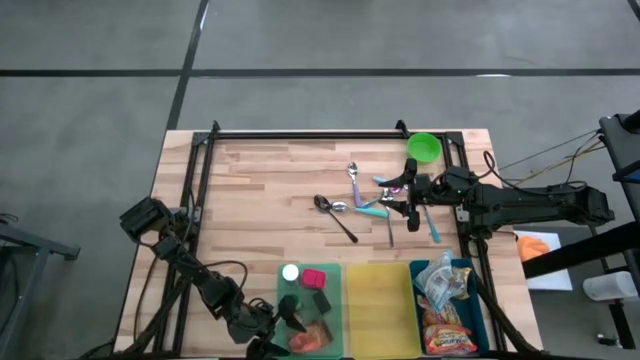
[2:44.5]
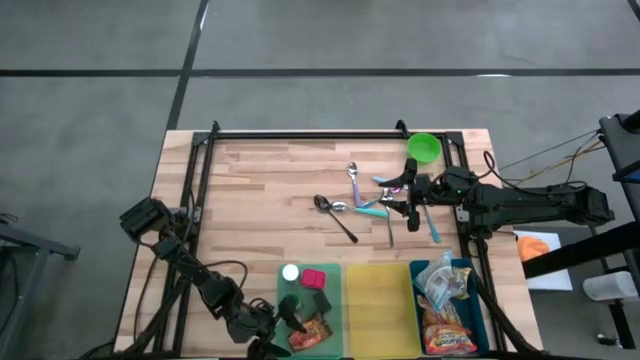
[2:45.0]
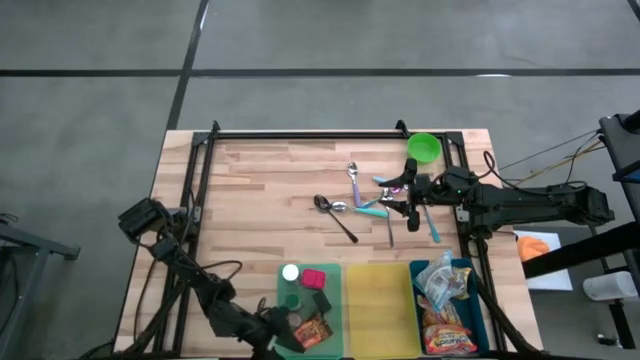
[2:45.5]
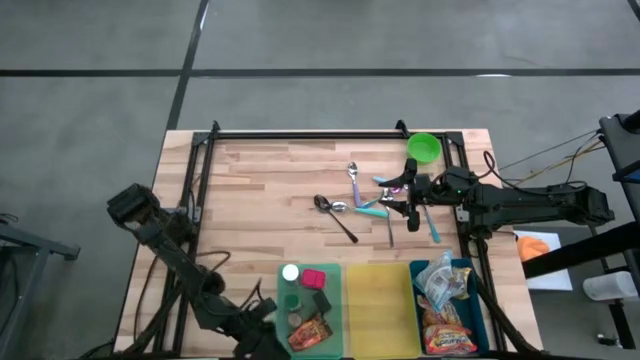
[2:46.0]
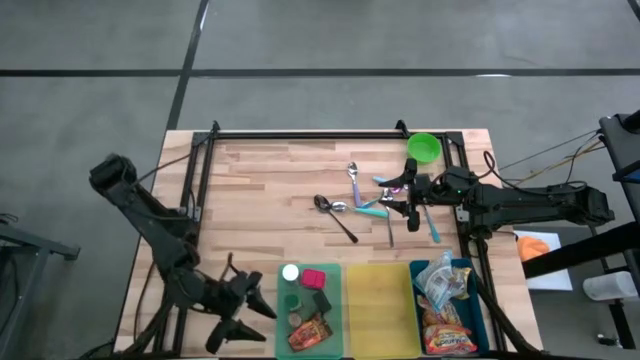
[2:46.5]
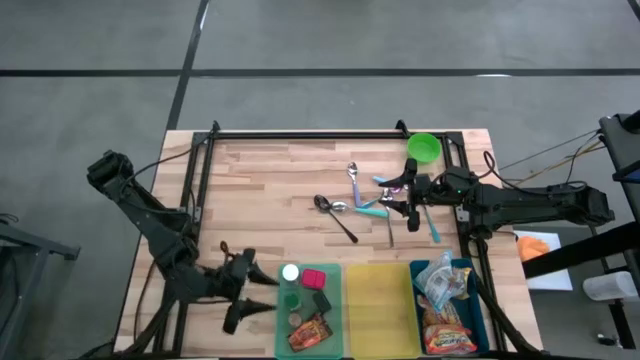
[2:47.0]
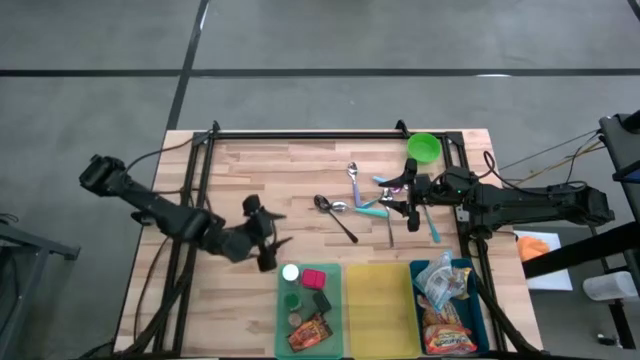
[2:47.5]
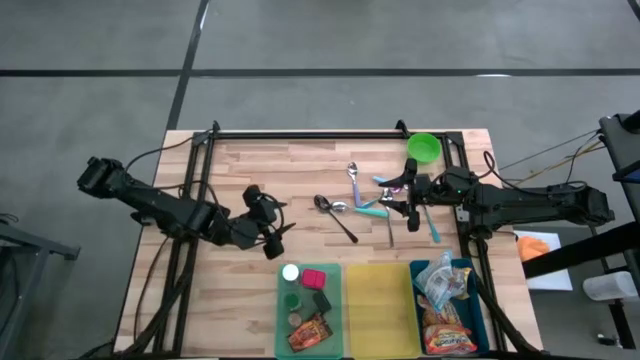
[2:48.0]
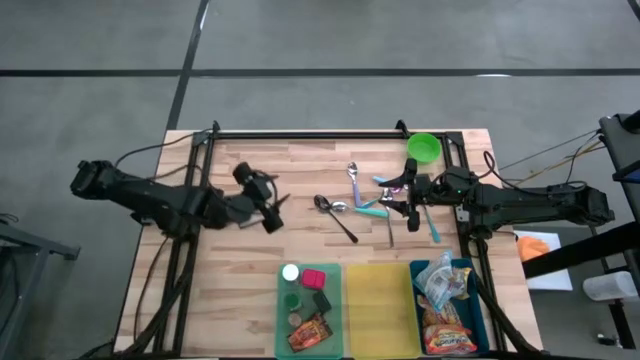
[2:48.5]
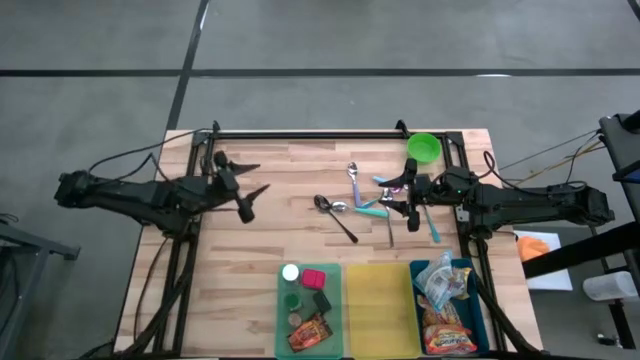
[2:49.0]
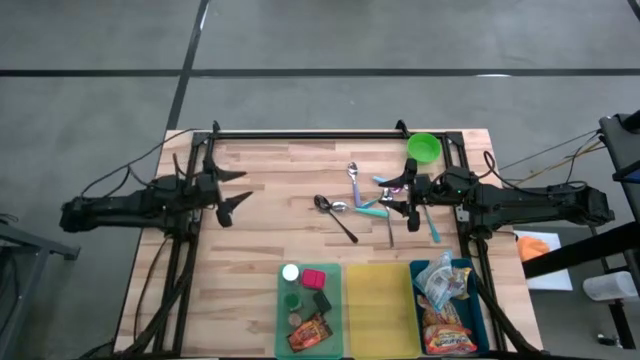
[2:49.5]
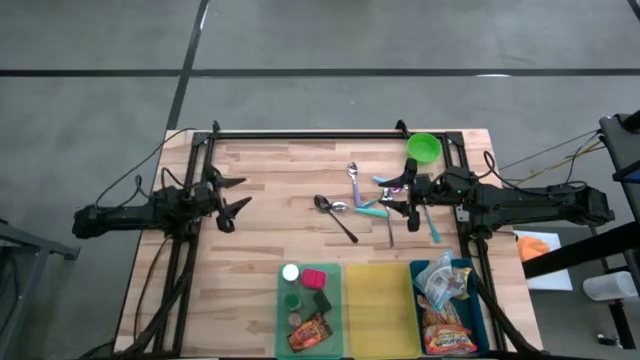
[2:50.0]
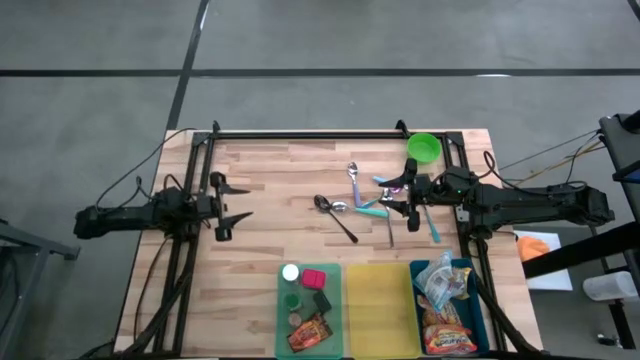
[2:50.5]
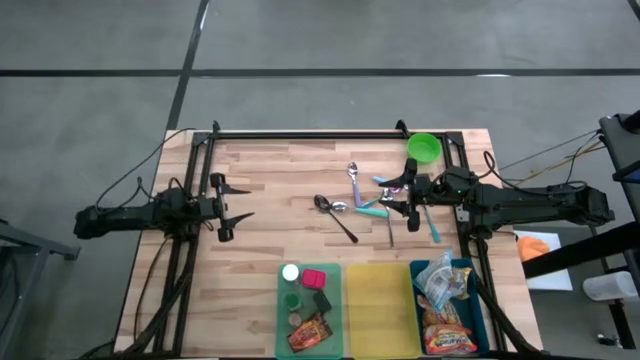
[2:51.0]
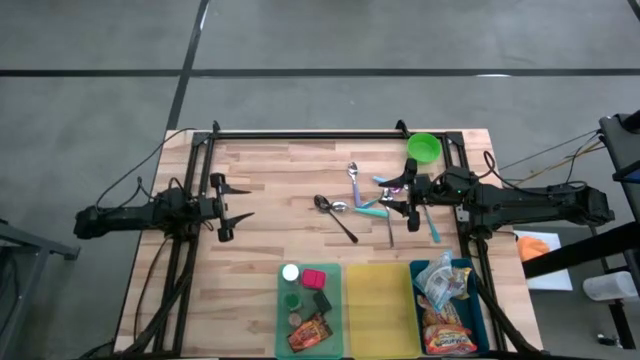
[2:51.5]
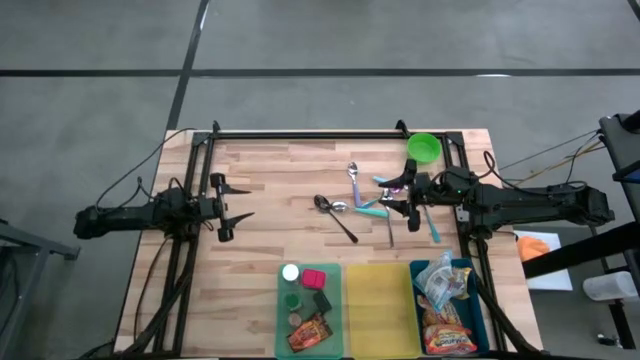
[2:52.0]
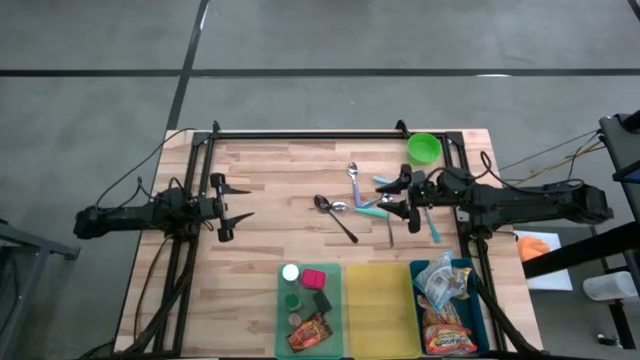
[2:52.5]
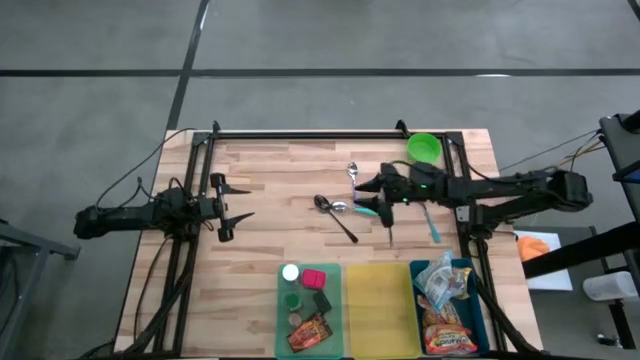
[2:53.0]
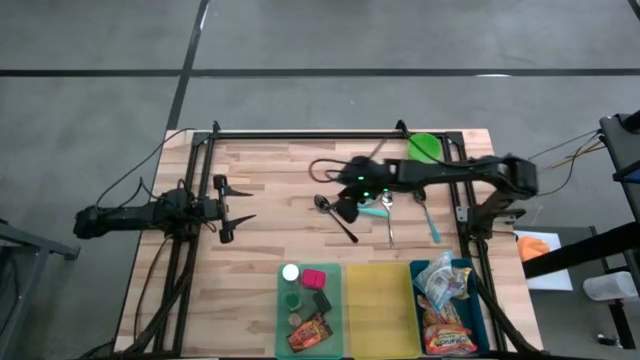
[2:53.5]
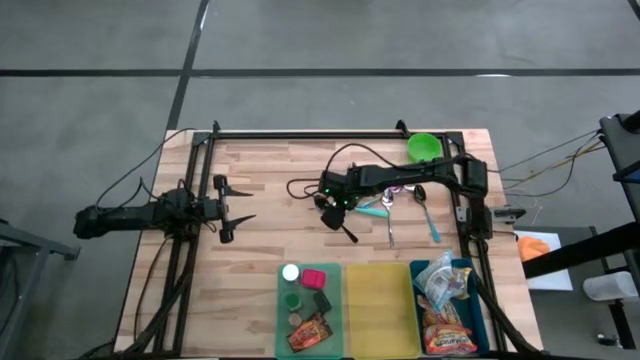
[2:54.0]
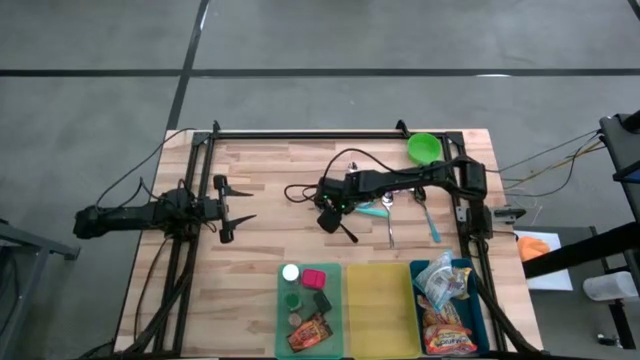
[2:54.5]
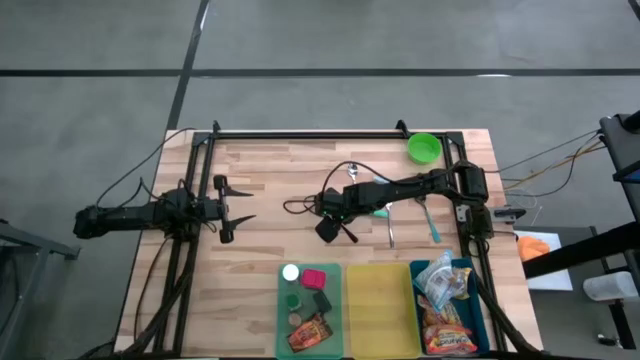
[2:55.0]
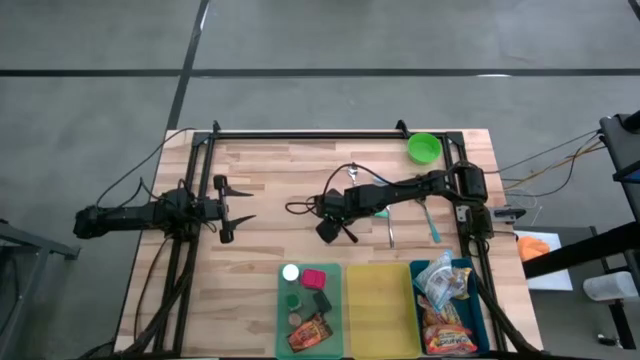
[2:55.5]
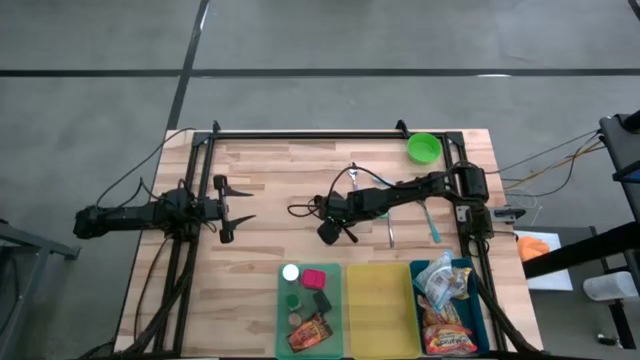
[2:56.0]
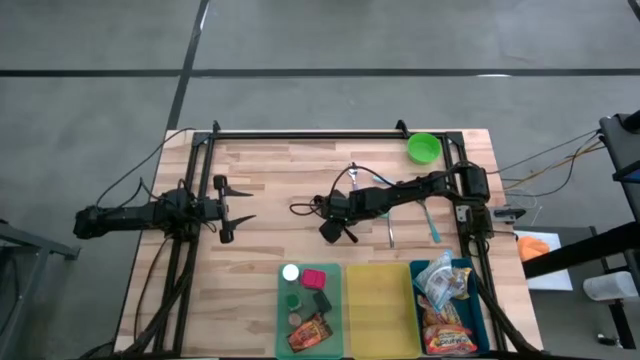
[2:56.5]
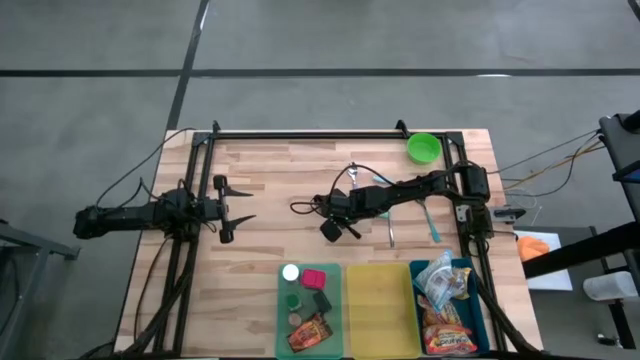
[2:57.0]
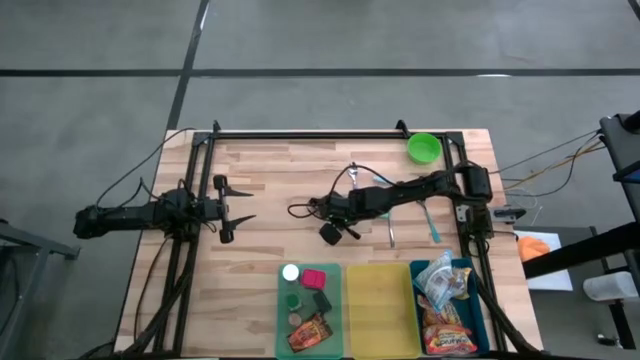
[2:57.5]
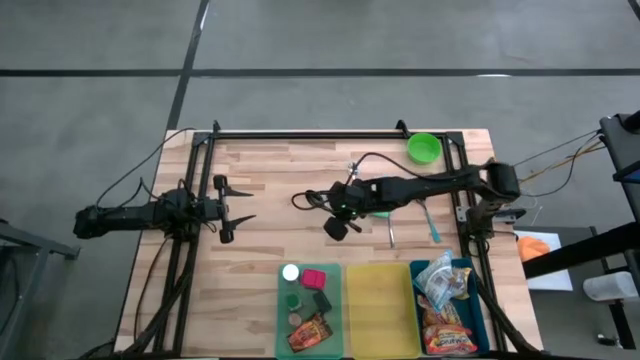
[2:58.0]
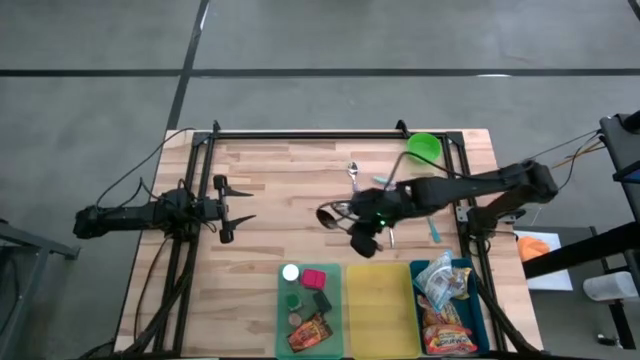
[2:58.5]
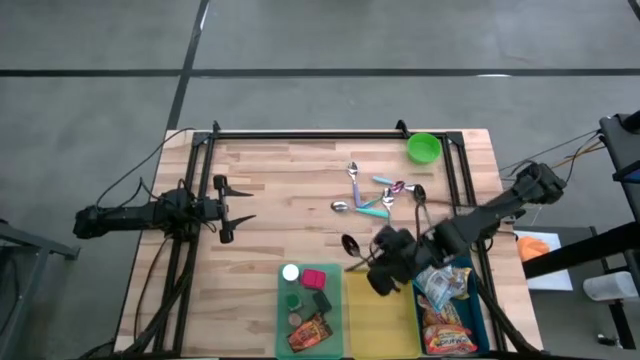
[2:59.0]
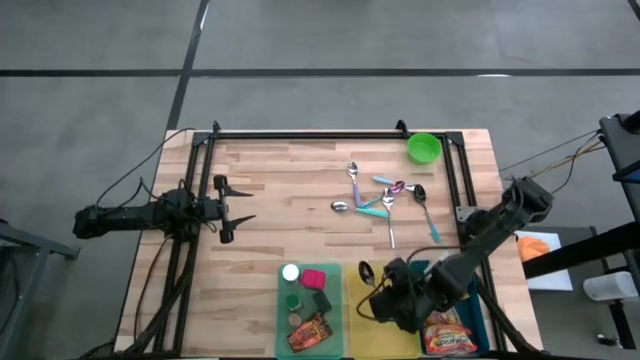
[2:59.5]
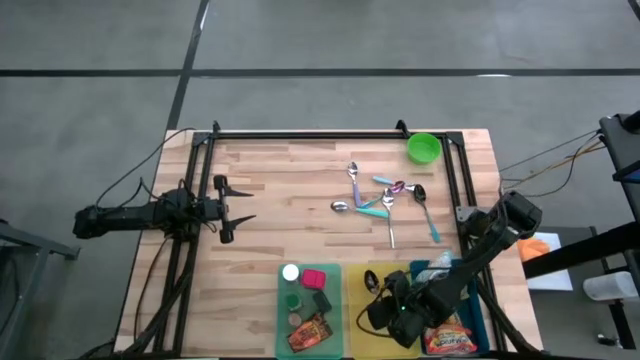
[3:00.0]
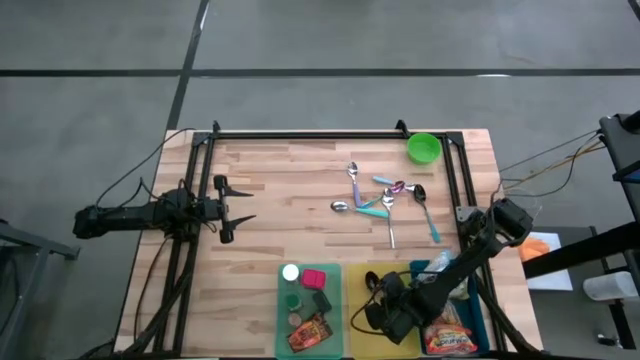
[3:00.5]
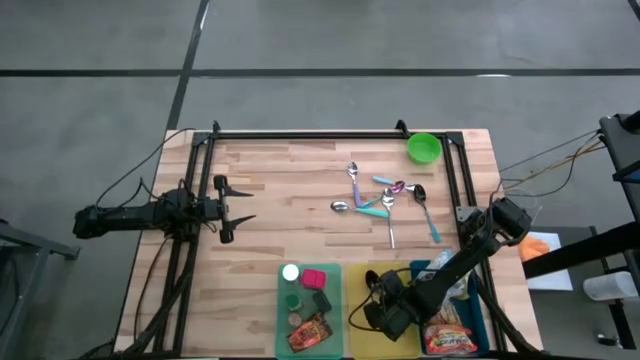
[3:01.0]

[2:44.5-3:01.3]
Put the black spoon into the yellow bin
